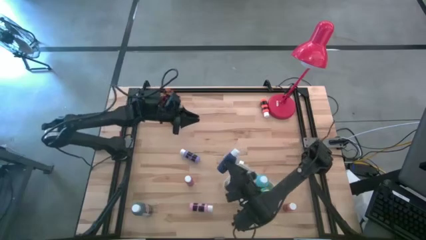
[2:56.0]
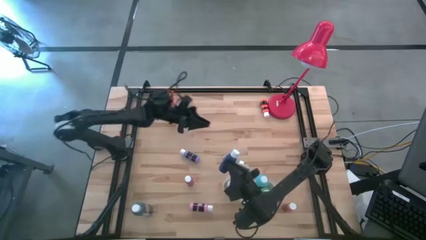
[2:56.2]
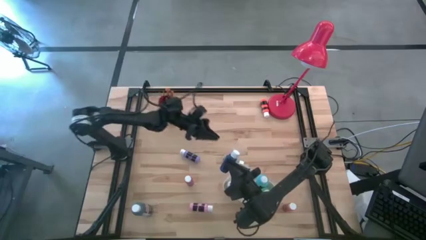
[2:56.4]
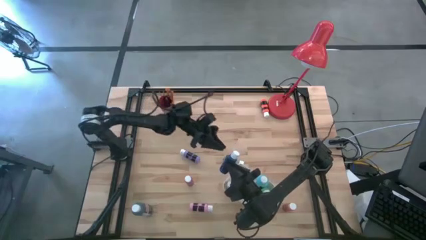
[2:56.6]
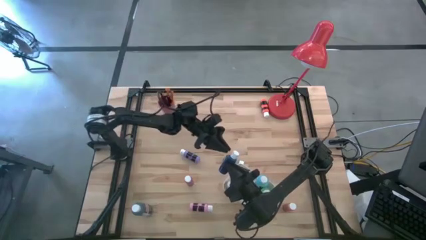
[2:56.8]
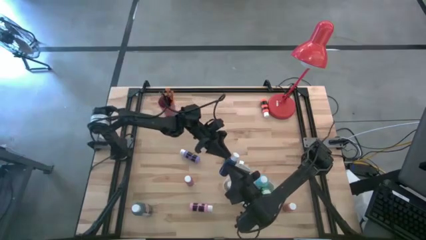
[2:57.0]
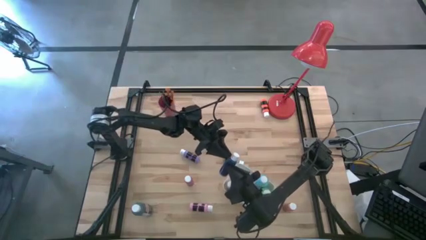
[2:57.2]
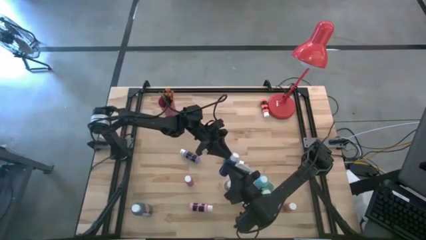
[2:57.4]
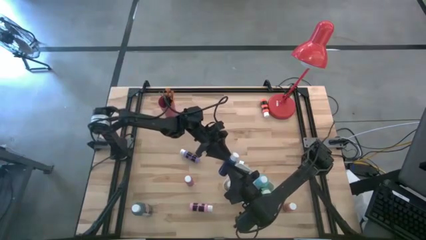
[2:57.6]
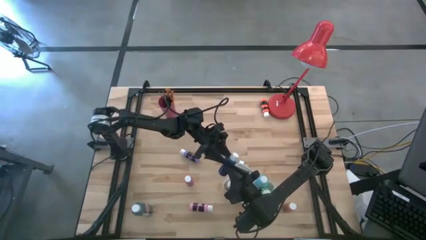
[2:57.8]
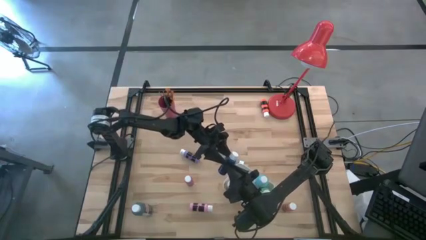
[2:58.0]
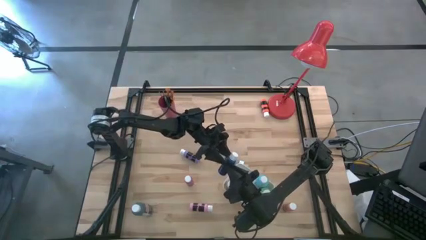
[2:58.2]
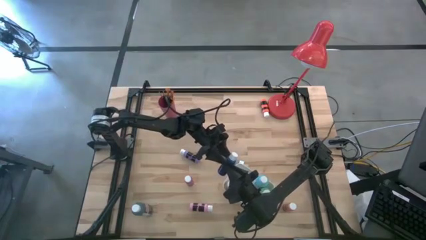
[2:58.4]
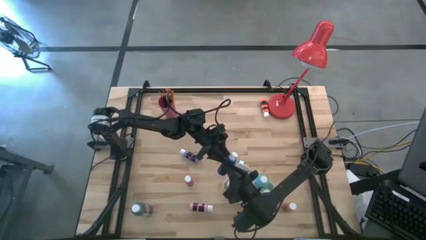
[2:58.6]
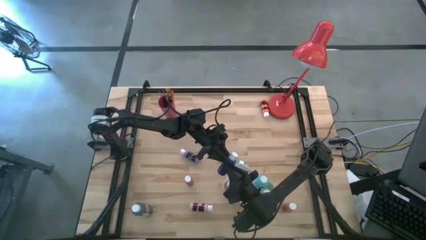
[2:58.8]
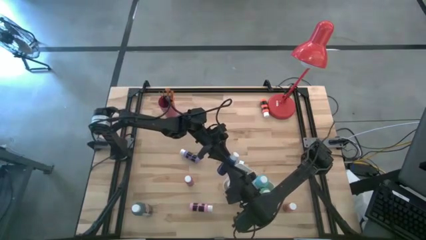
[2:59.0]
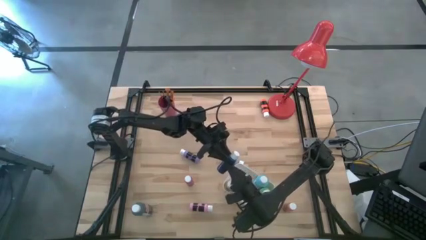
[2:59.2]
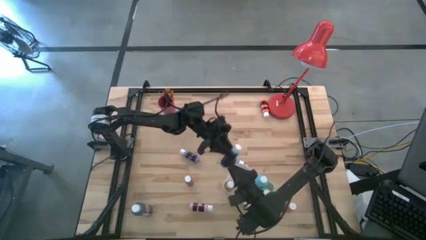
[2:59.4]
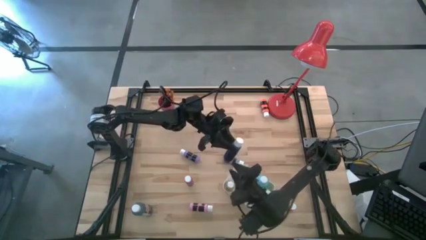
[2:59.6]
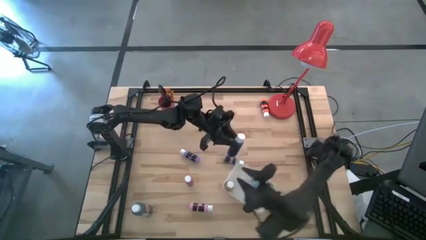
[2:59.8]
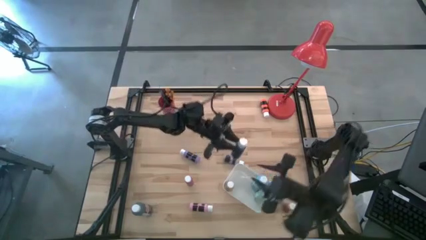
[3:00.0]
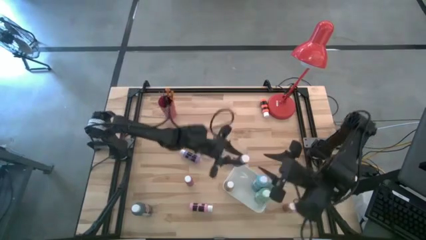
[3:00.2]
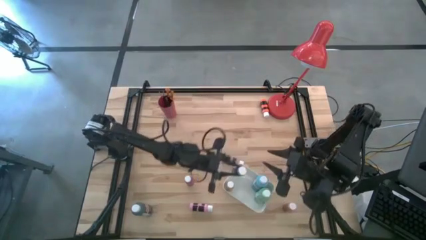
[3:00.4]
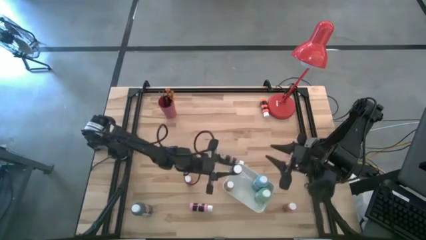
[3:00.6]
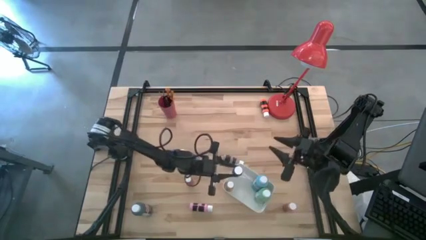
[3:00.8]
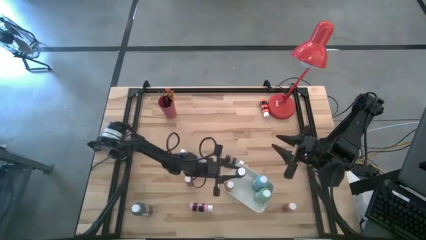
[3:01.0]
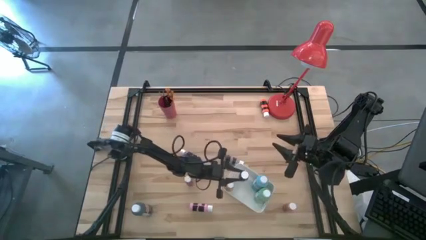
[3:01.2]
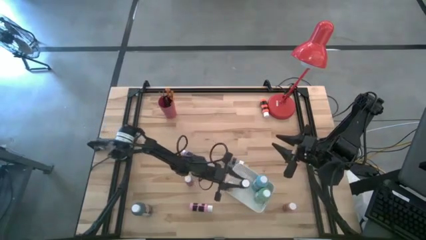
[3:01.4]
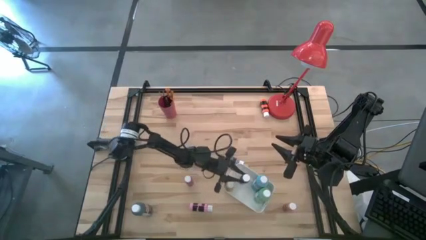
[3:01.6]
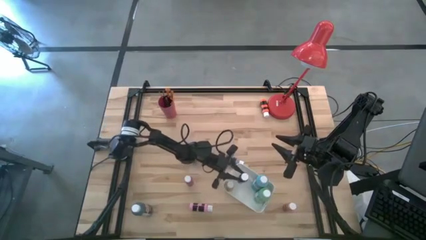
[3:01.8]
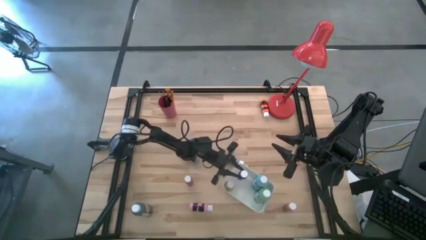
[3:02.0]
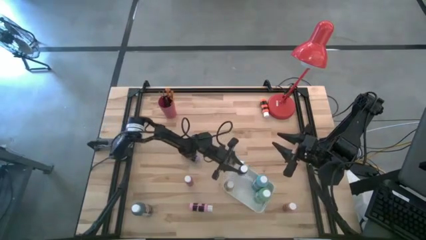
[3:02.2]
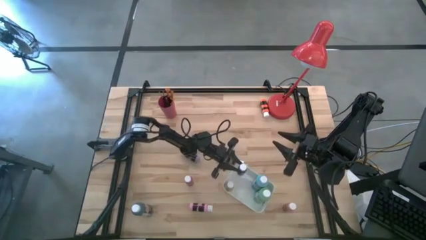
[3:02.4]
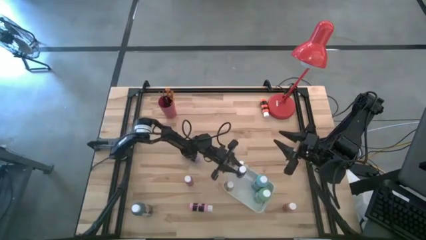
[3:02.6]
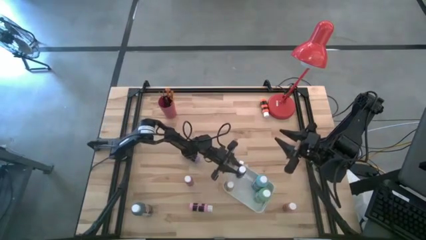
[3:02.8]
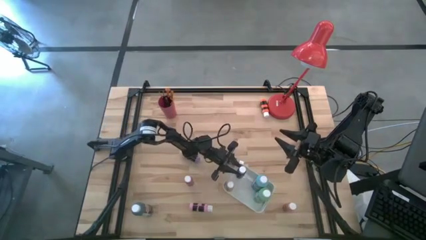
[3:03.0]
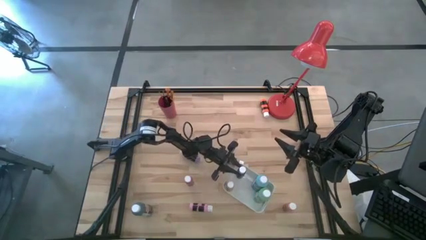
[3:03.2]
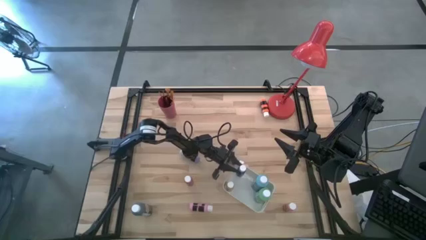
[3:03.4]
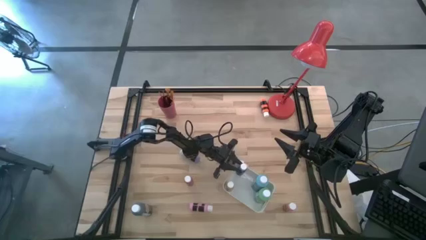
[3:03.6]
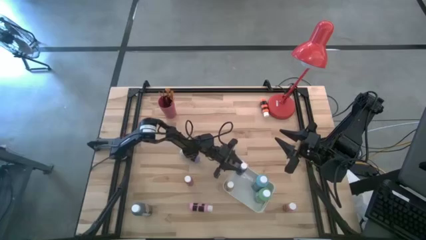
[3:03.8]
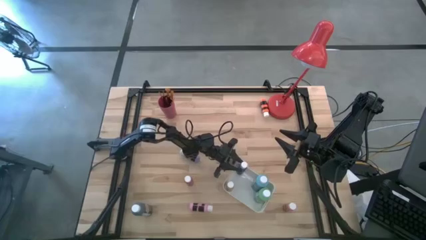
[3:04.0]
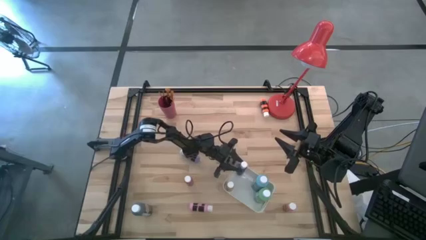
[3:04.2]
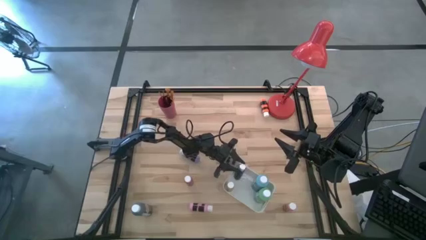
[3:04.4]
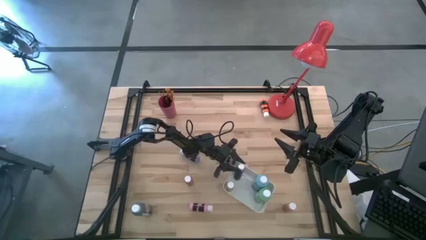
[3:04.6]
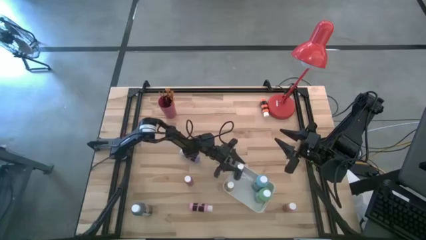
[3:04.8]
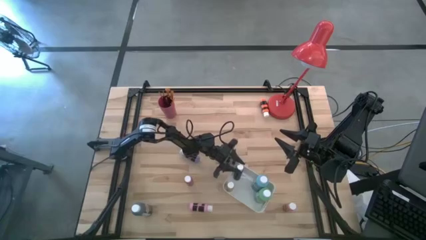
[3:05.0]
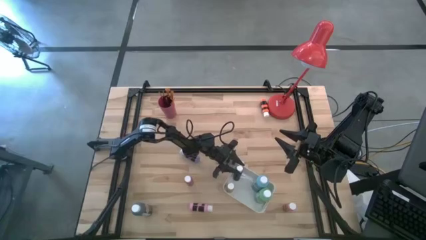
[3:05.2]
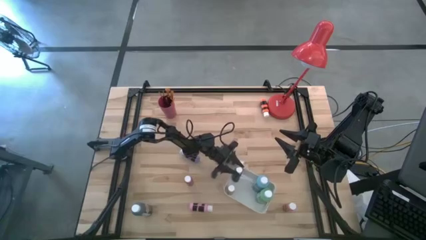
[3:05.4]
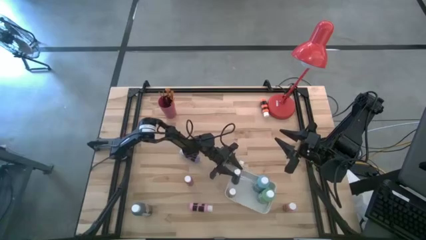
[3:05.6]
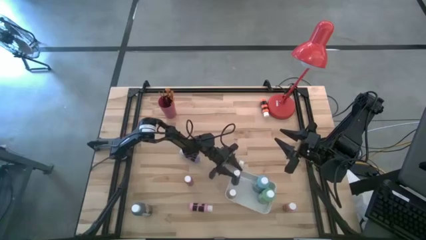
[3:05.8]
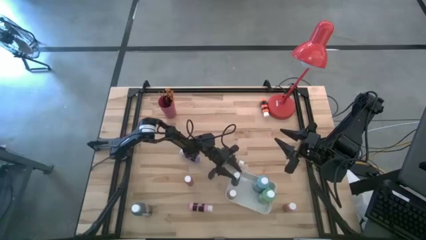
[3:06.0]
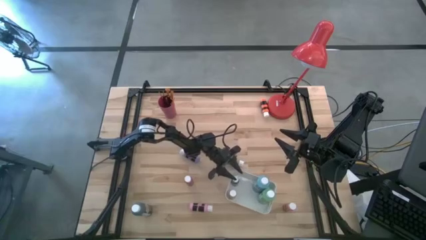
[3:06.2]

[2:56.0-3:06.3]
Task: Pick & Place Paint Supplies
Put the blue paint bottle into the white bin
